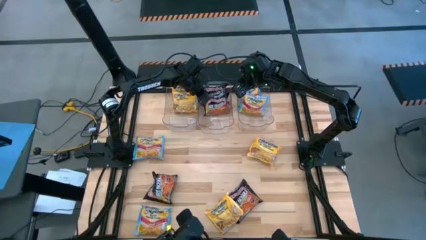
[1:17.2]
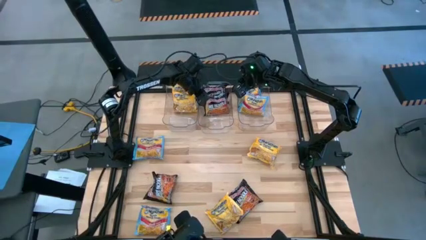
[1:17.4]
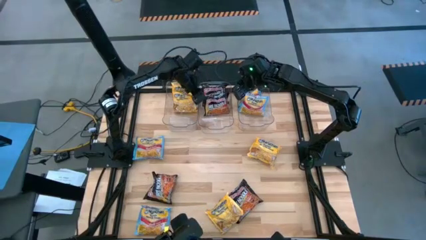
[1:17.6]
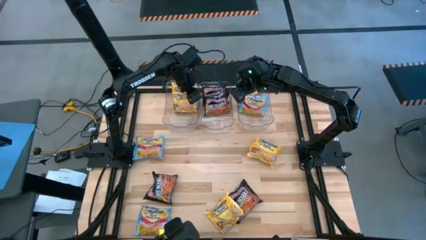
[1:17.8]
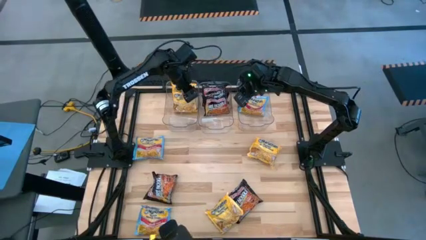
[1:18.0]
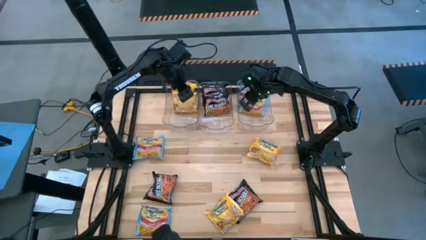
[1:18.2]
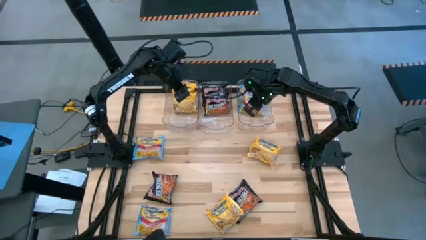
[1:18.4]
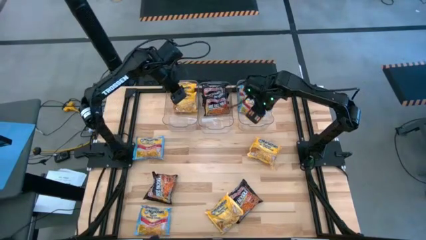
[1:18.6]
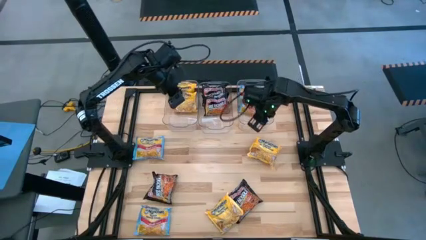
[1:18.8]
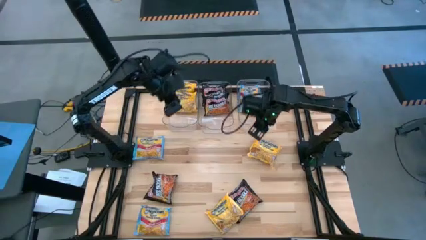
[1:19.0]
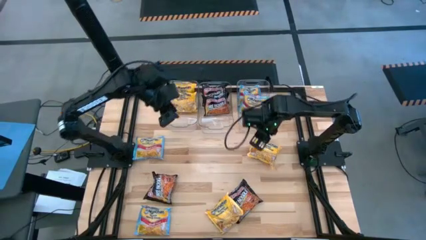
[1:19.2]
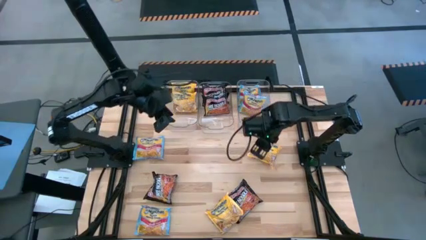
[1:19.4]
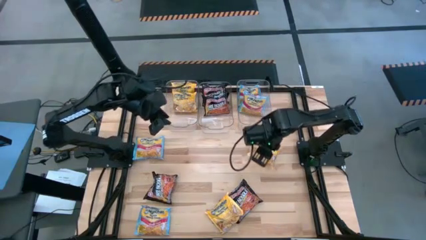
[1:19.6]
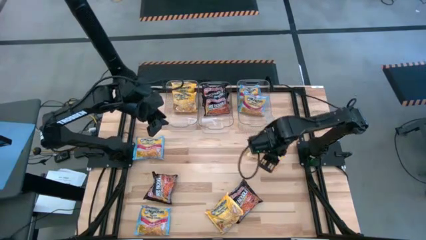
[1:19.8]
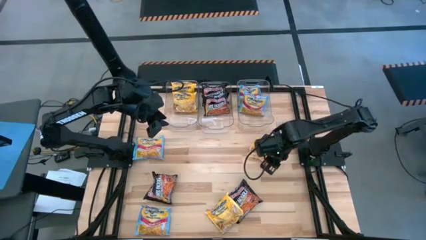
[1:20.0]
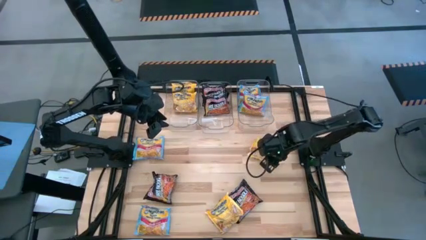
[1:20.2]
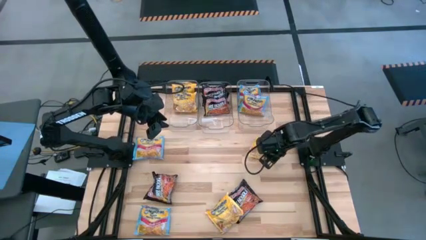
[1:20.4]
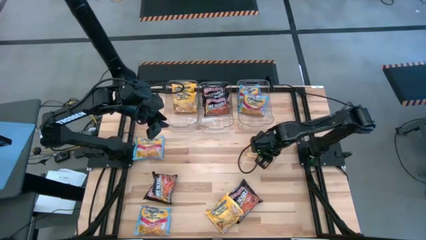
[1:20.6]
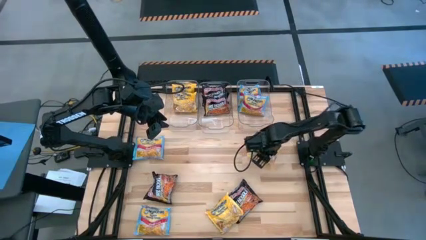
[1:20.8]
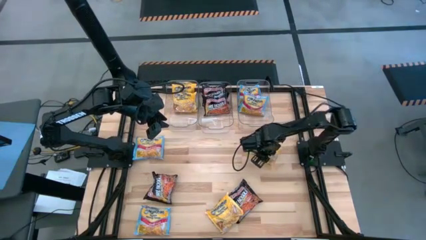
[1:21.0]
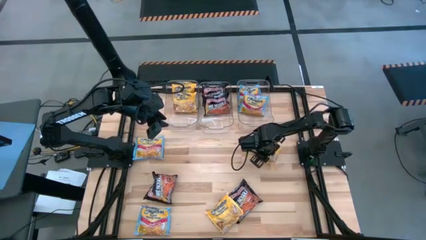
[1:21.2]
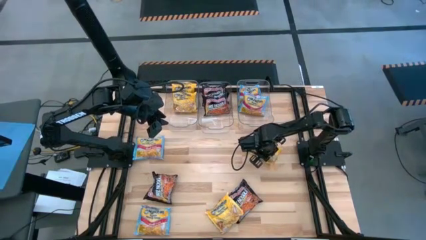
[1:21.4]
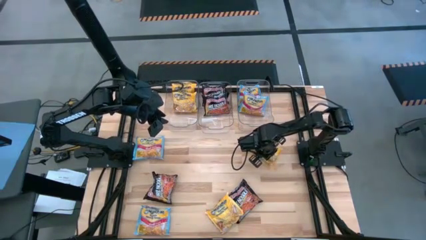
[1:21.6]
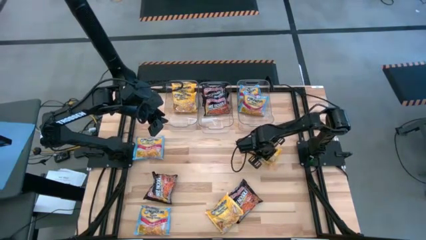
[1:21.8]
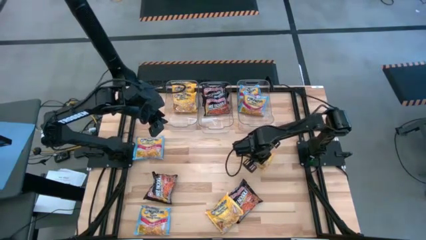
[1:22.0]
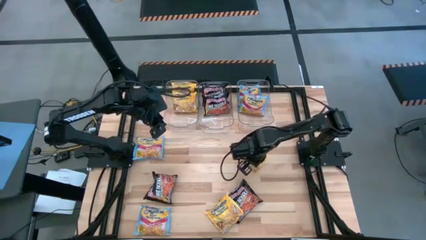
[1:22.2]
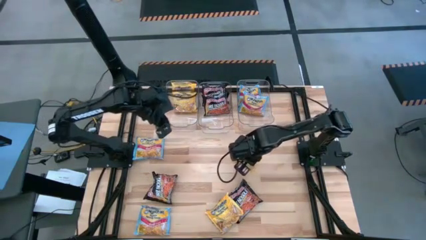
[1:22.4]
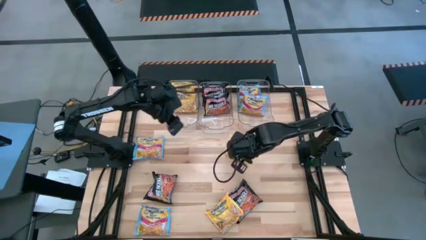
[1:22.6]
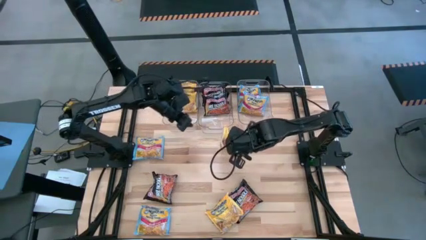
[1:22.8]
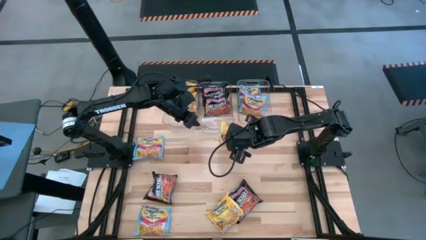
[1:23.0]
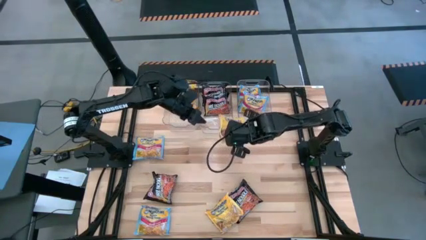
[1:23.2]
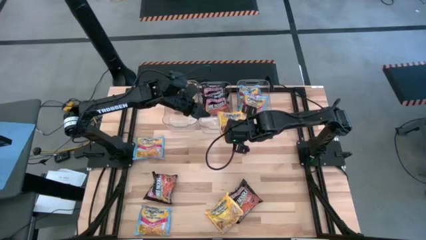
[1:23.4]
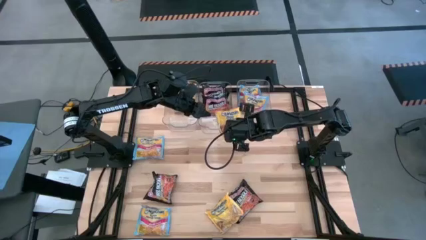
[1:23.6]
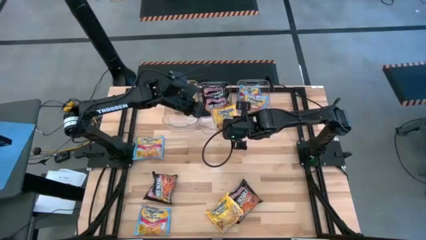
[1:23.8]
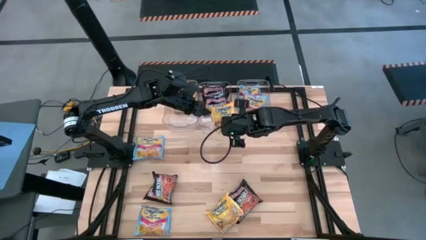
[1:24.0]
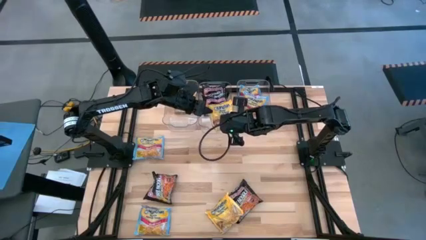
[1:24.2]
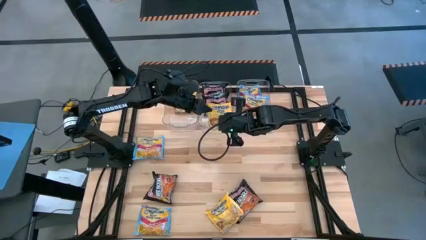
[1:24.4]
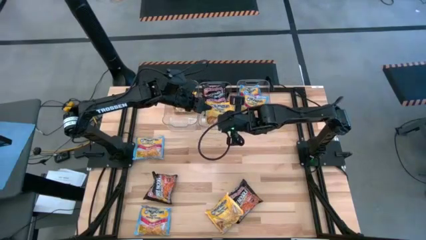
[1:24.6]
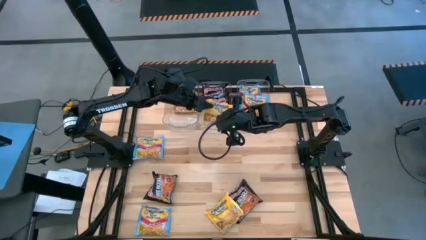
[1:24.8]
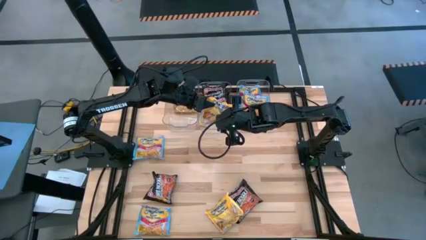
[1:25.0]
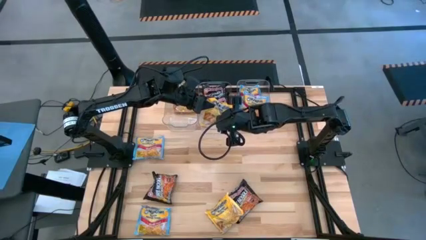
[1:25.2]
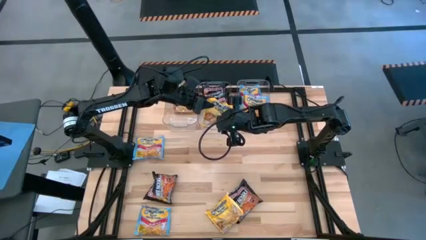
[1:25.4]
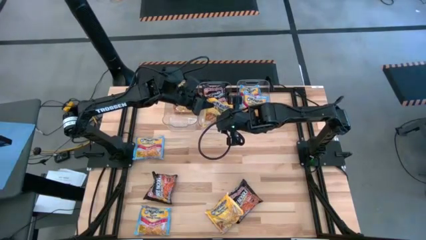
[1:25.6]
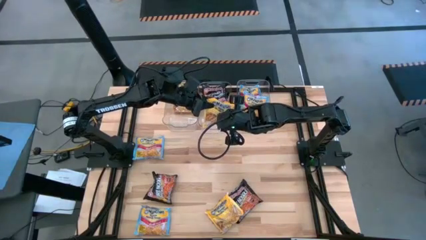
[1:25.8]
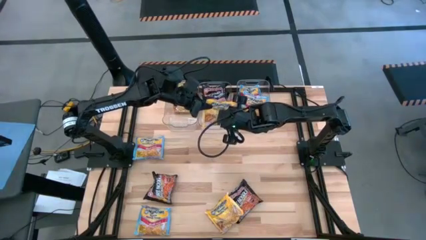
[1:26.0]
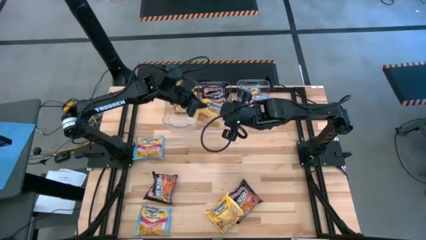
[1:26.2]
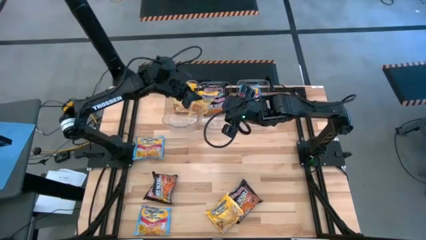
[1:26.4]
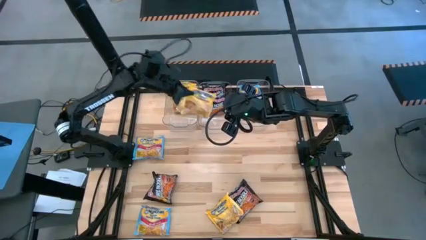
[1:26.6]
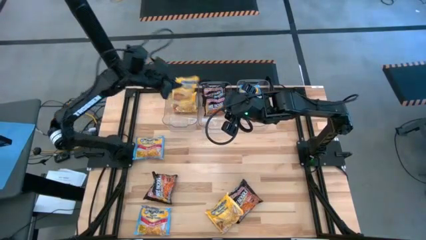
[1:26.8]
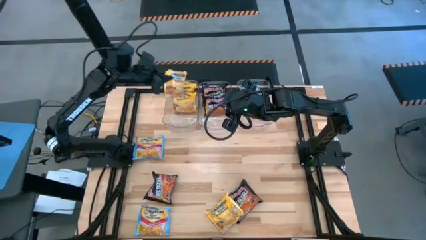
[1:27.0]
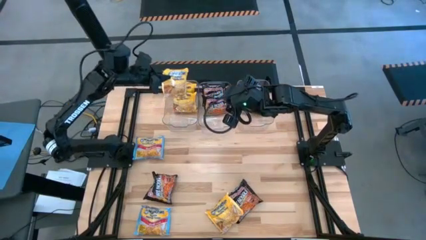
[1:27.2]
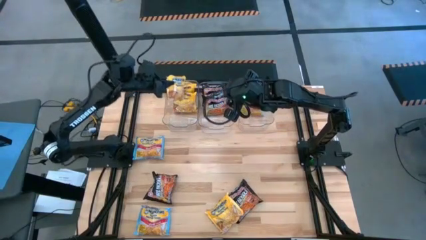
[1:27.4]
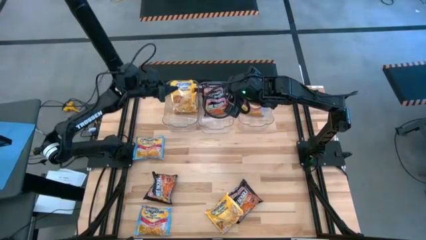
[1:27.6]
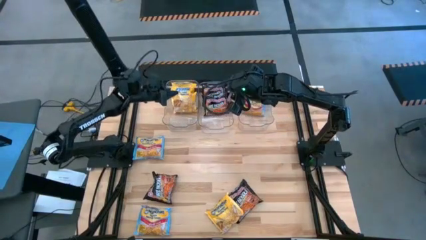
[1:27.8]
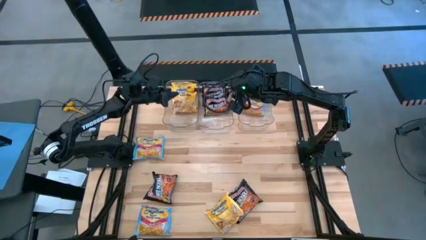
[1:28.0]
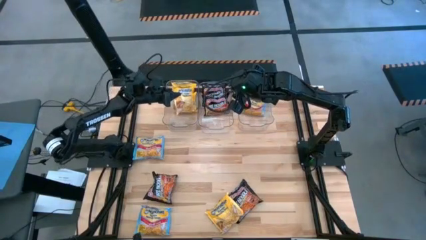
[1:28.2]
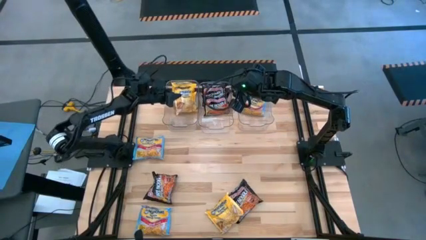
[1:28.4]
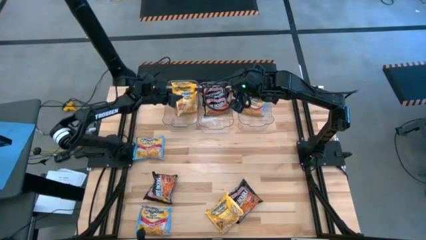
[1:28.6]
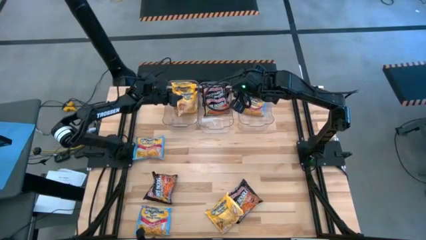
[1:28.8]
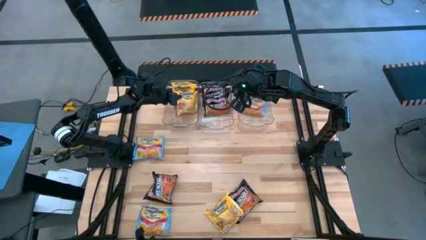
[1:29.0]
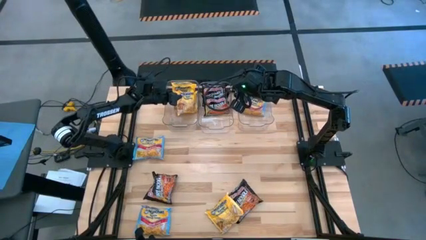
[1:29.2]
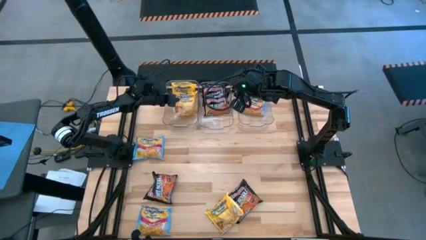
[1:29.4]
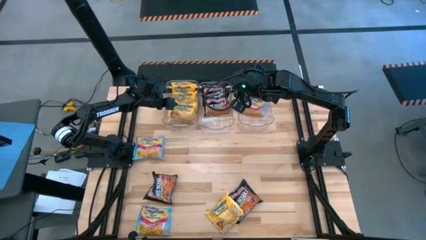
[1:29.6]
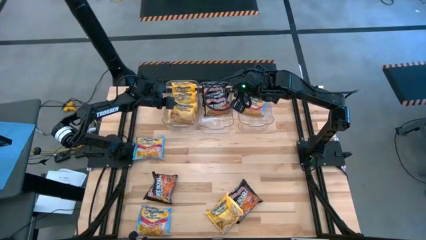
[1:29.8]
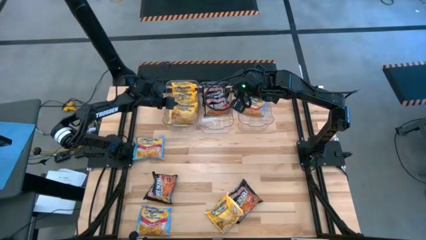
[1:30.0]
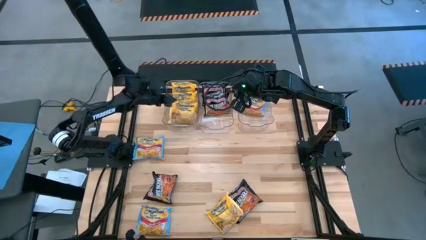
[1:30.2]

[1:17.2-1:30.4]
Task: Sort Maruchan noodles
Put the yellow noodle pack in the left transparent bin

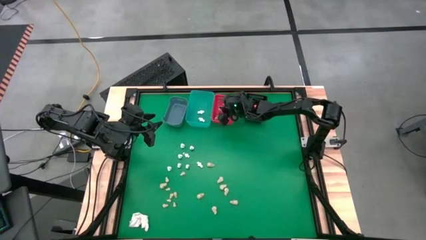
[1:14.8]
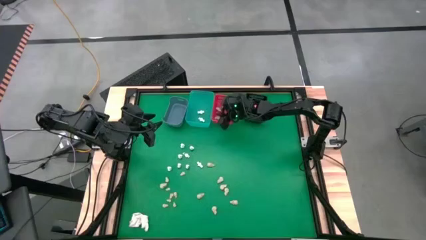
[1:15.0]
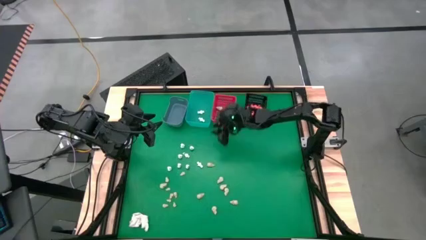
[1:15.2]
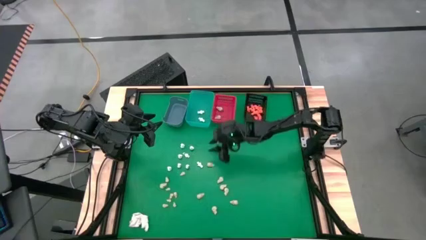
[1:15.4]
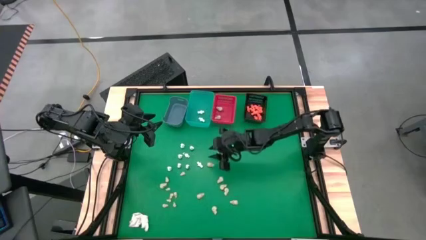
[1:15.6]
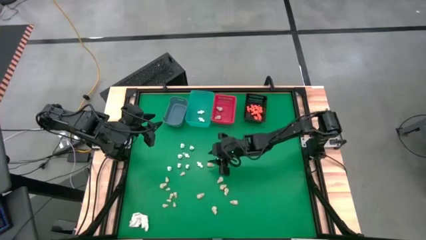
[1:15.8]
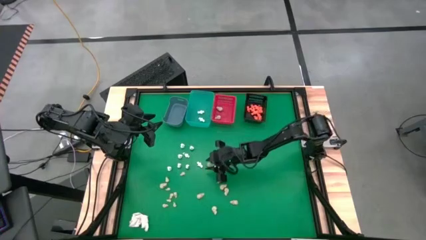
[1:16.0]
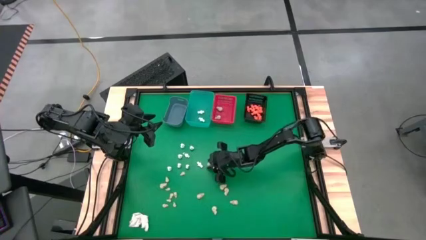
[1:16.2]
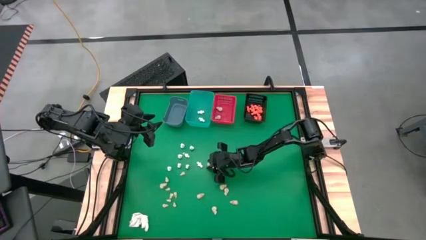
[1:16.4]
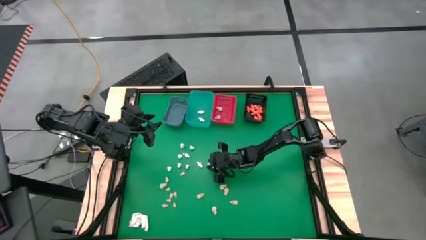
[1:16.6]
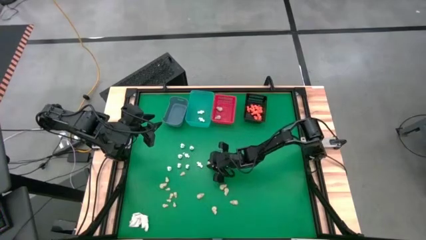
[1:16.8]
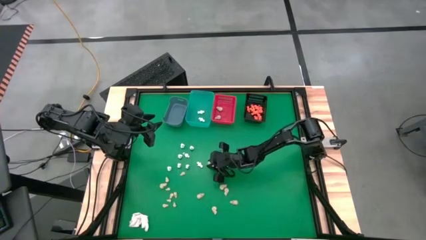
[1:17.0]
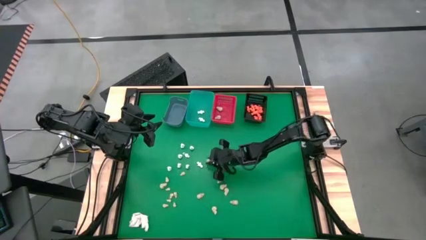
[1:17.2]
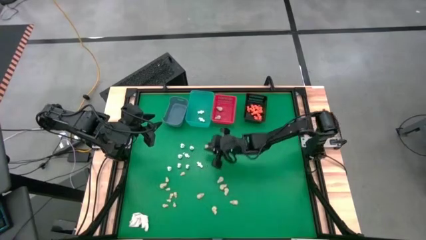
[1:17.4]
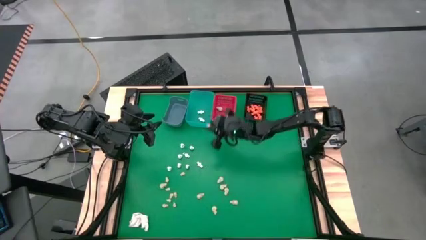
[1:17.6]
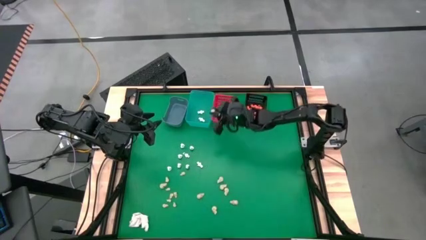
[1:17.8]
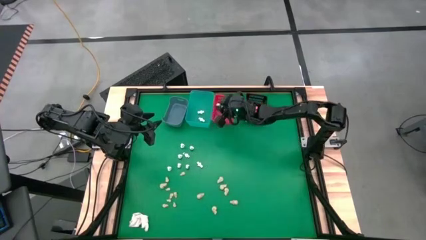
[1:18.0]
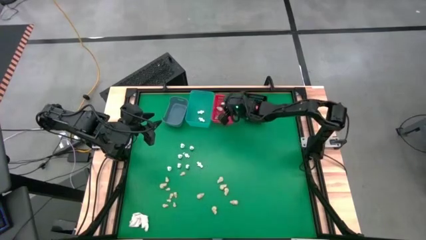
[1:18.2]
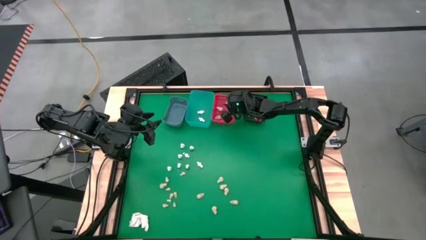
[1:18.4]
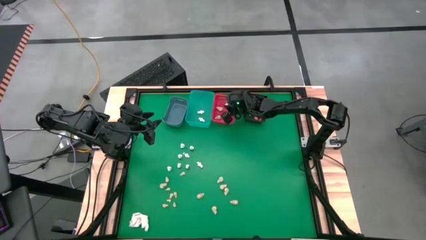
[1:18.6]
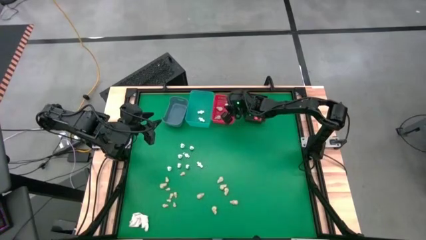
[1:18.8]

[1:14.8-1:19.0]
Task: Sort Halloween decoration
Put the white skull toy into the red bin
